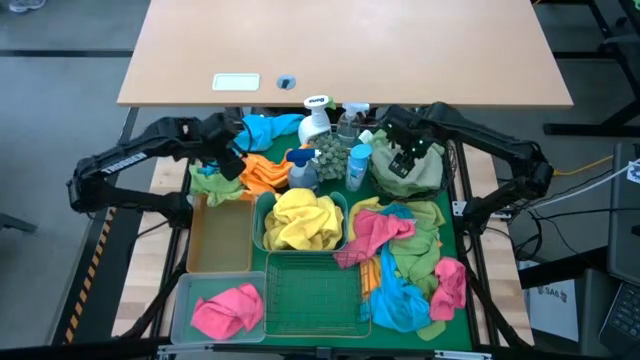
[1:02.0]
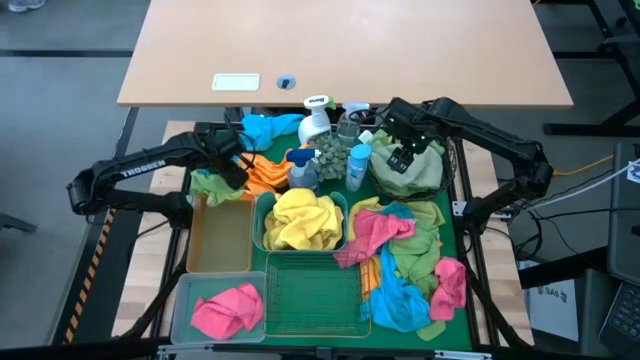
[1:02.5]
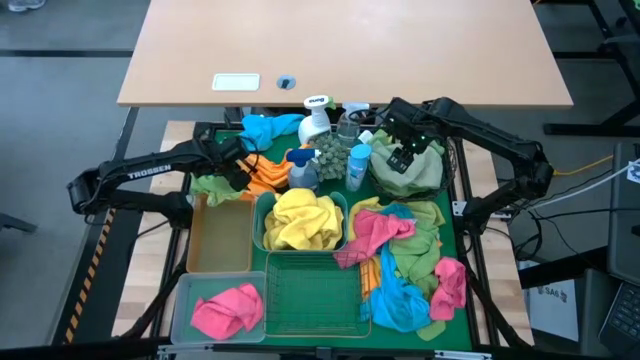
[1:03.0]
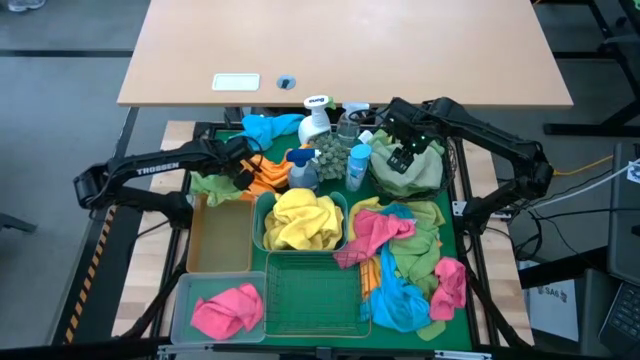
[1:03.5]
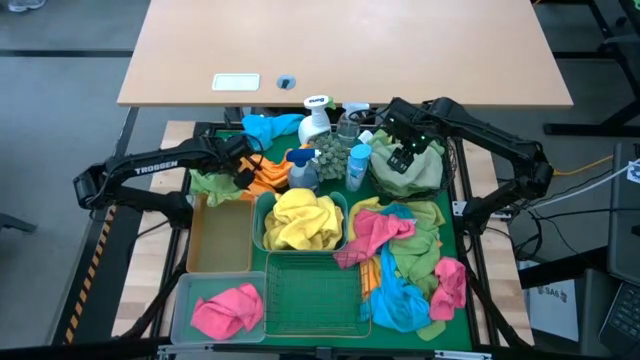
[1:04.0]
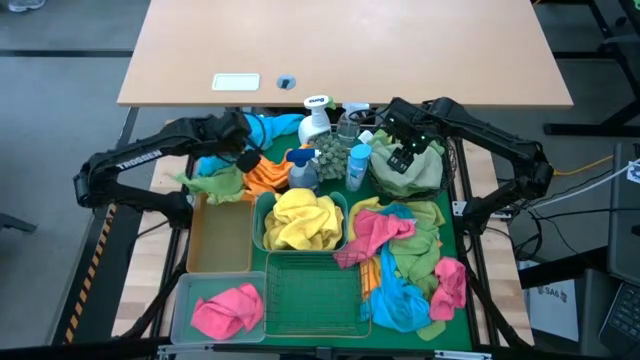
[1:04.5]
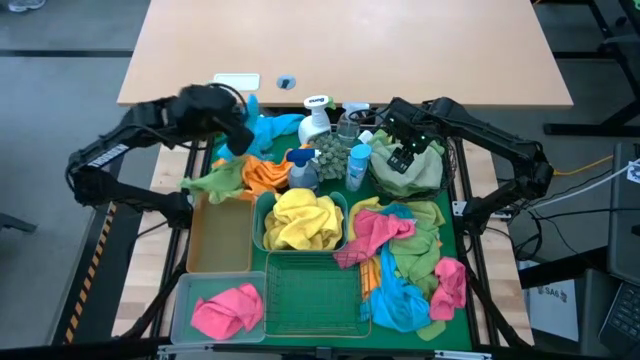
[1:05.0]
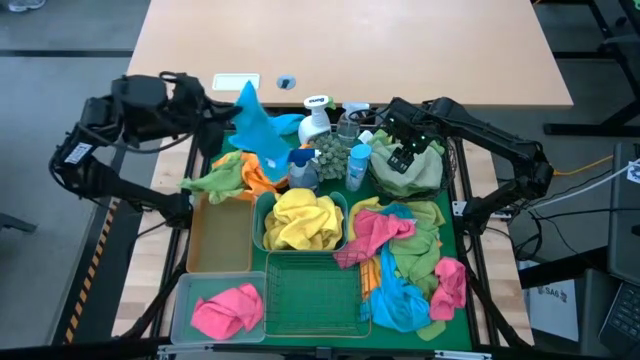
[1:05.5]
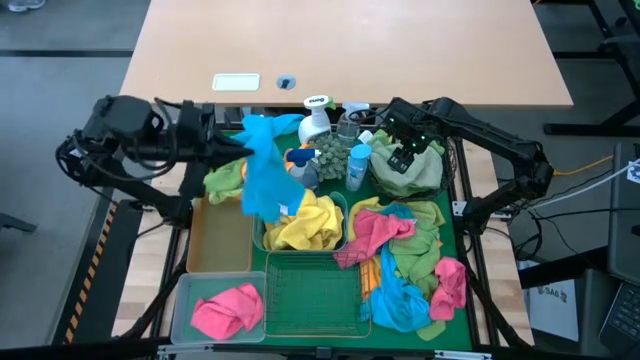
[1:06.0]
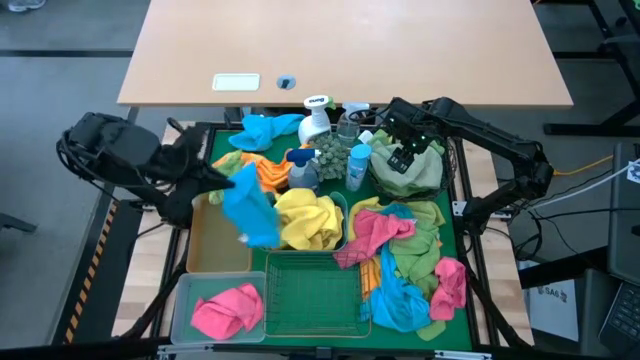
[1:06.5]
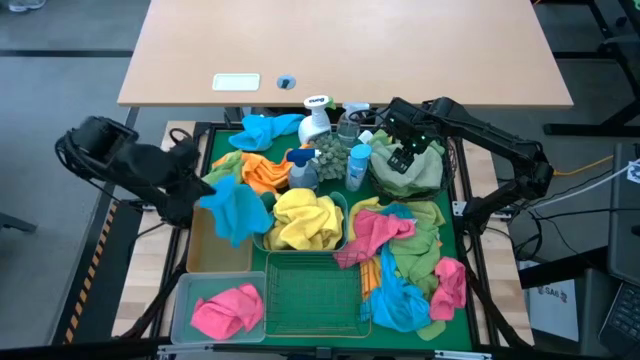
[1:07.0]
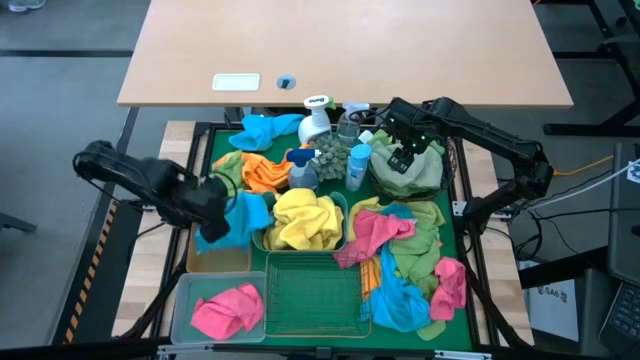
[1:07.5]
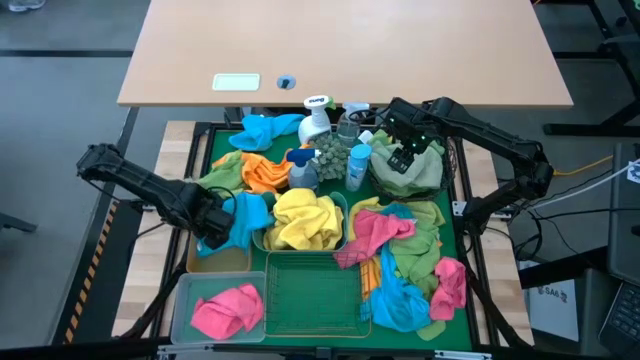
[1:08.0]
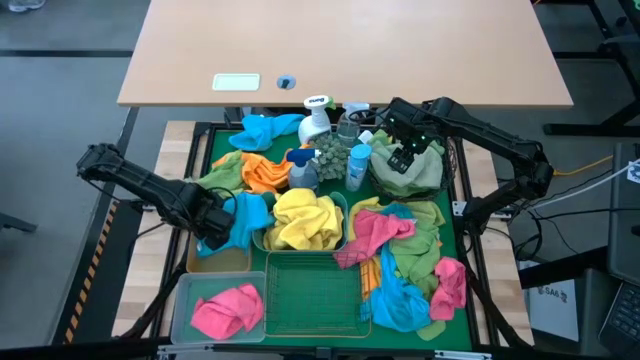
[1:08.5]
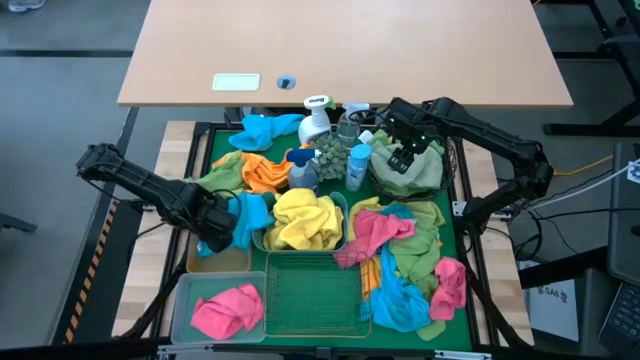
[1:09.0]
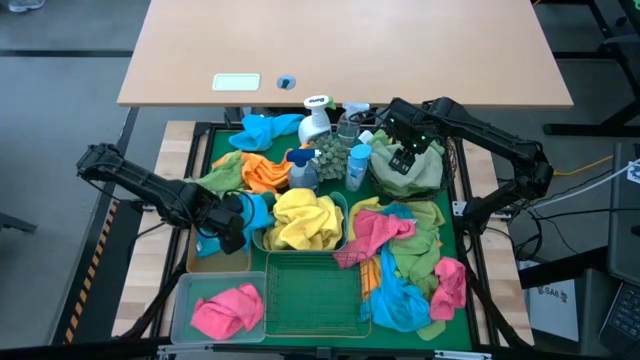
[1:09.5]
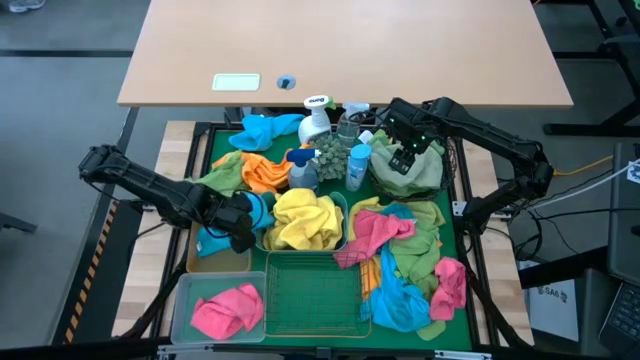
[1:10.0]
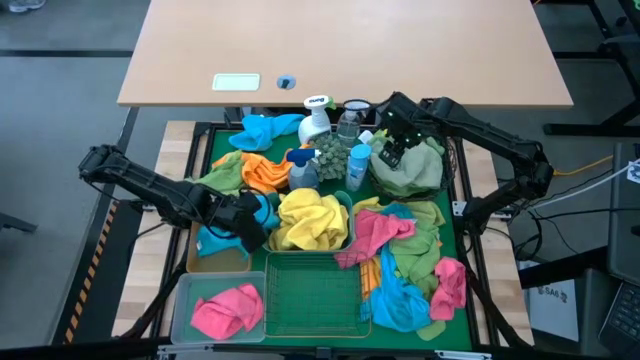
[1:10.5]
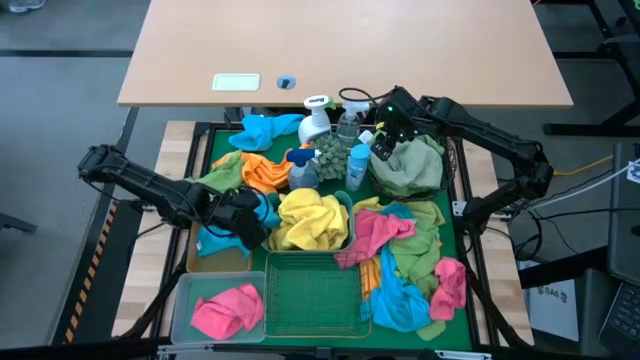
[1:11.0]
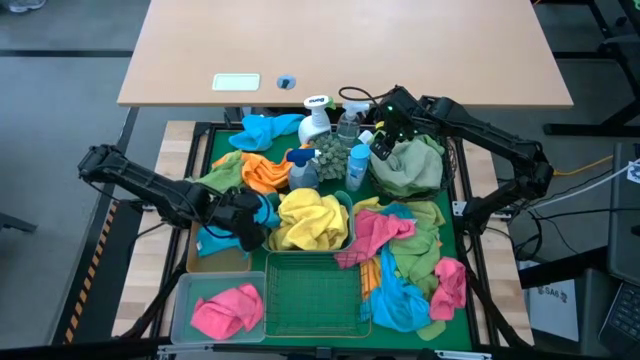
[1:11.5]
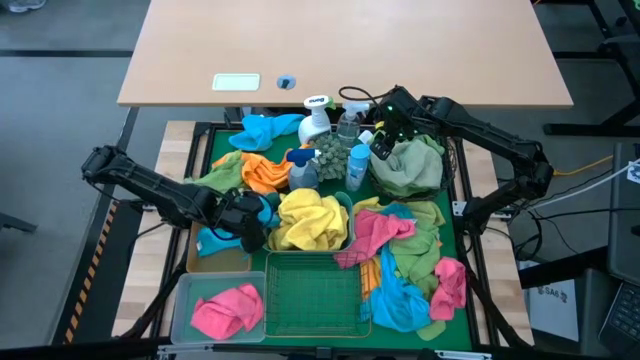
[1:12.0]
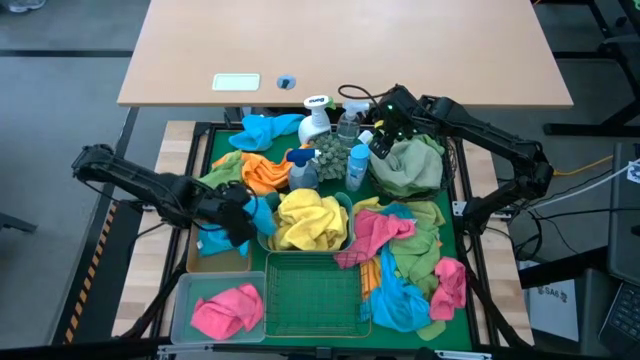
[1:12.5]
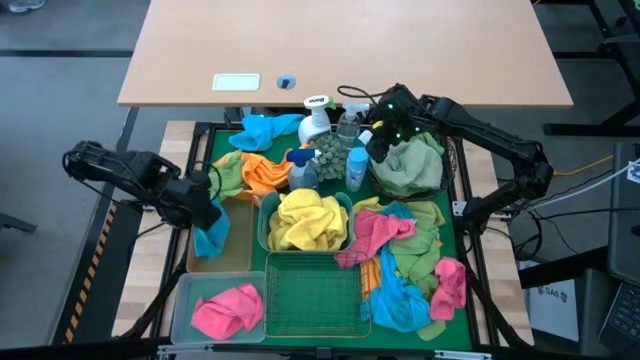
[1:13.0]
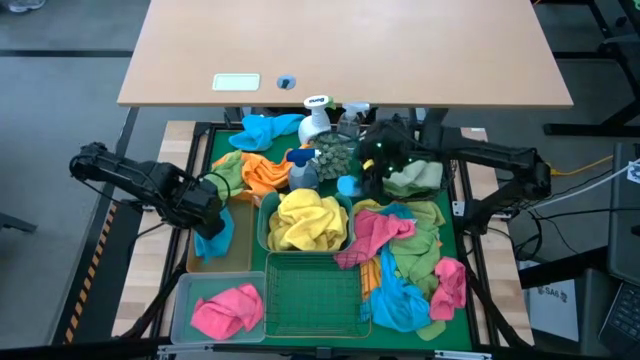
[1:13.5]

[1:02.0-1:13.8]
Task: Sort microfiber towel by color & place in baskets
Put the blue microfiber towel into the orange bin

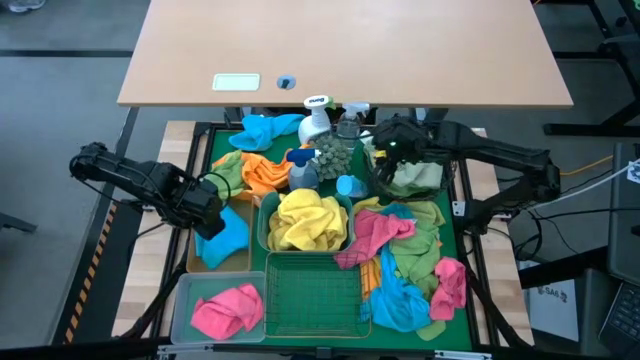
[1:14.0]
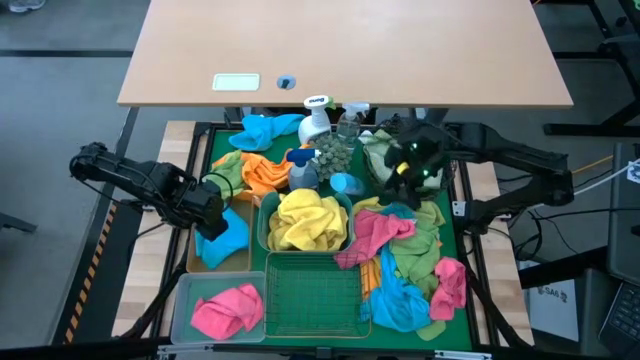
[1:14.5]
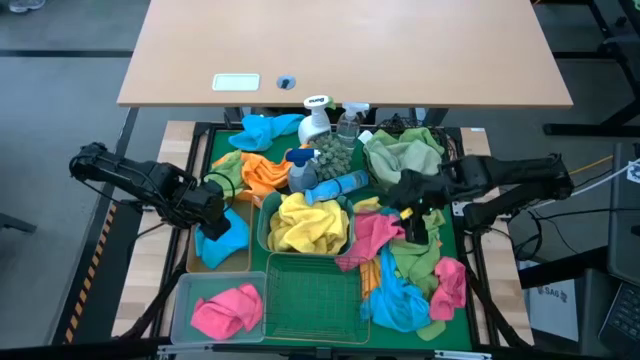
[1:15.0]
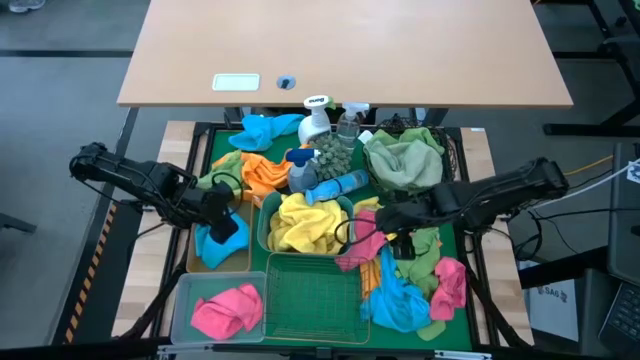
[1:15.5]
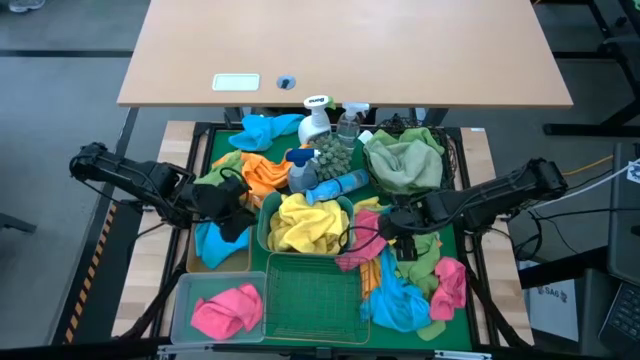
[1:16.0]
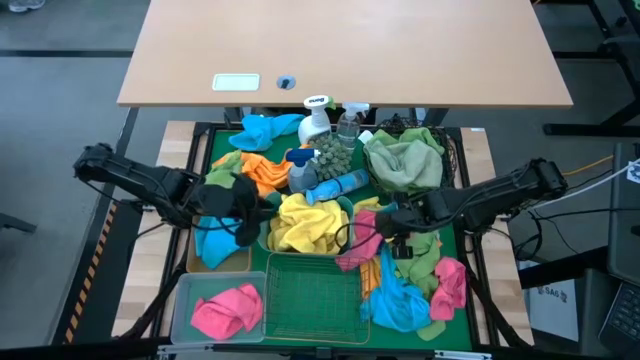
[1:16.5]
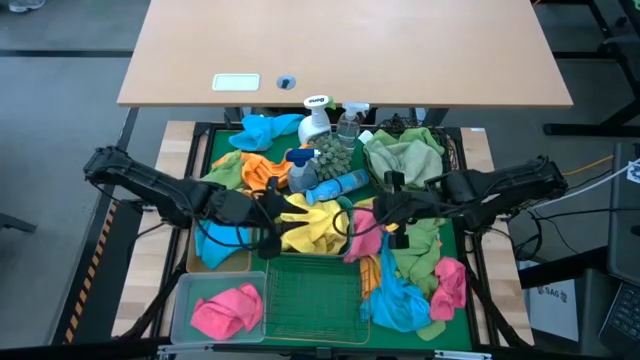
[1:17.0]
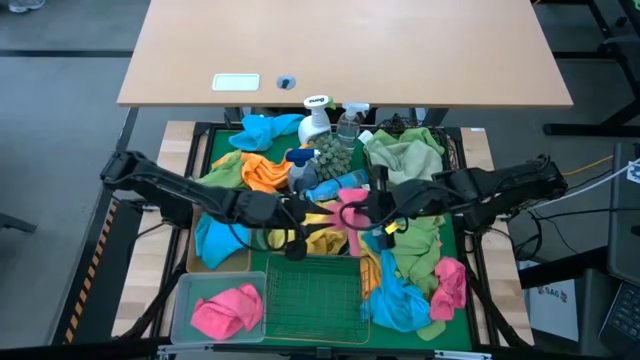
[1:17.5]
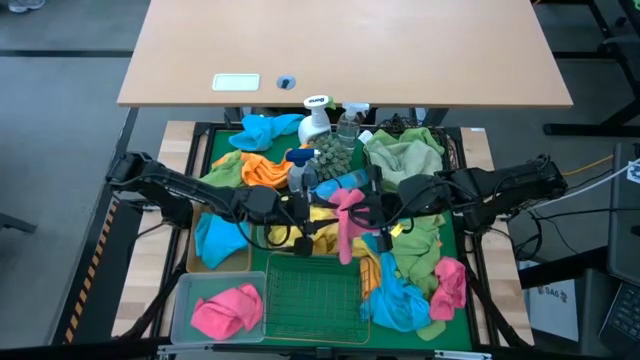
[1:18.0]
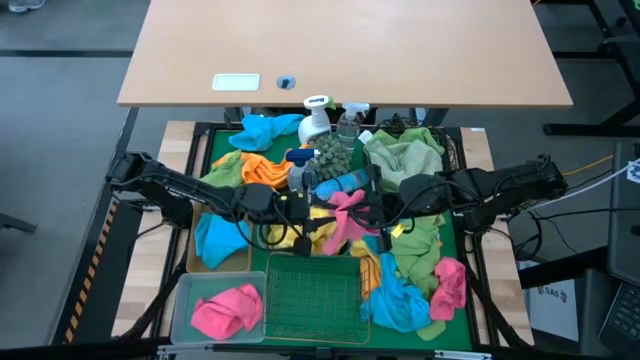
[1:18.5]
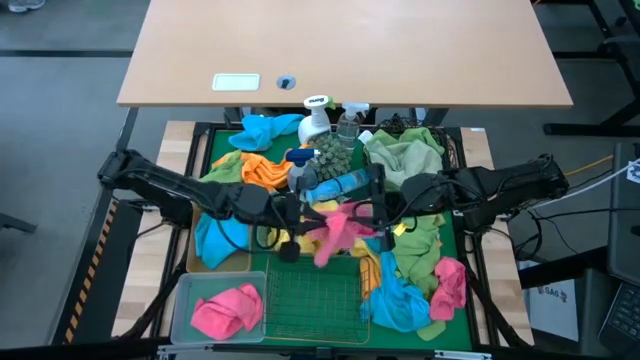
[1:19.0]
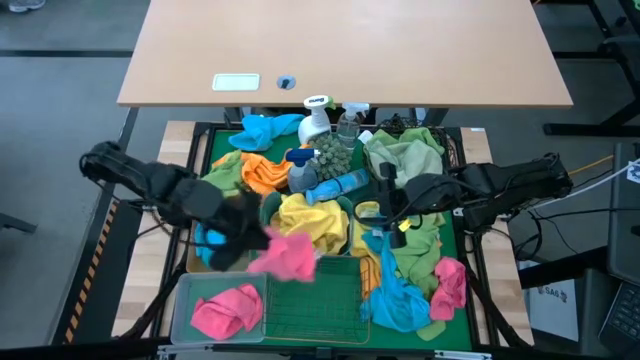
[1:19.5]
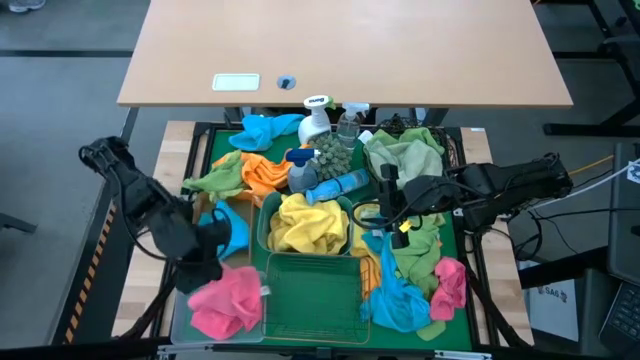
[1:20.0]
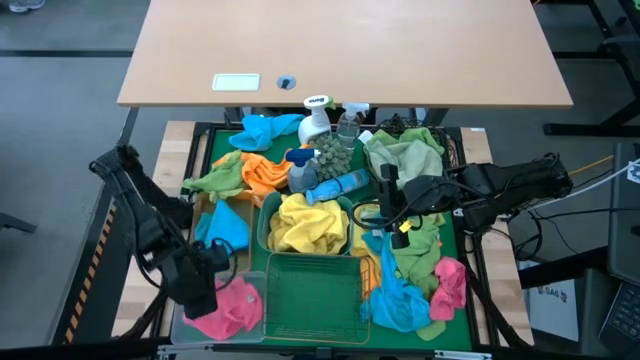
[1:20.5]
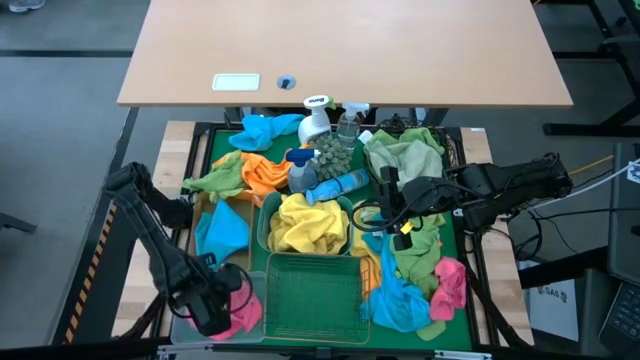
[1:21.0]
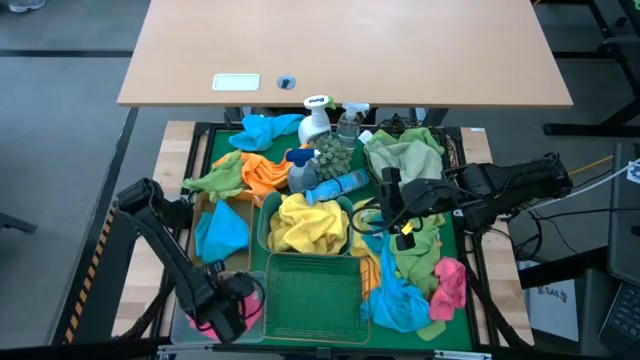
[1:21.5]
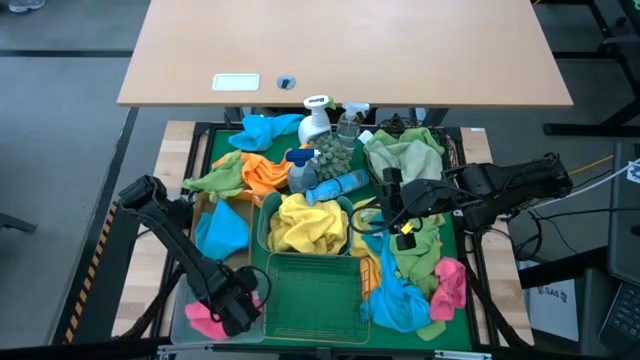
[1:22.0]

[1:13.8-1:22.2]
Put the pink microfiber towel into the transparent bin

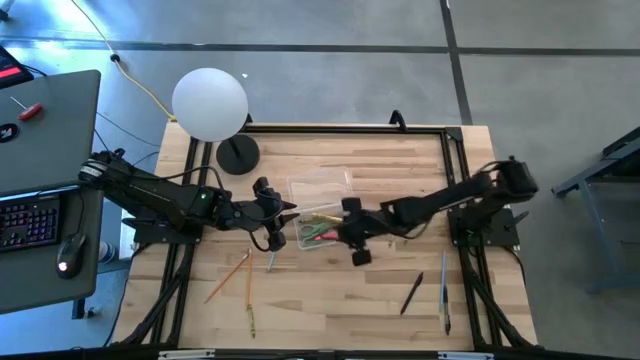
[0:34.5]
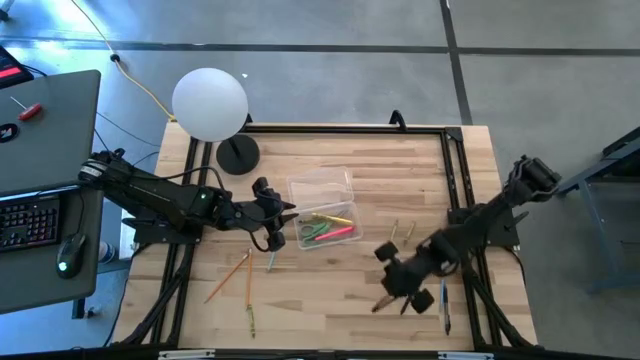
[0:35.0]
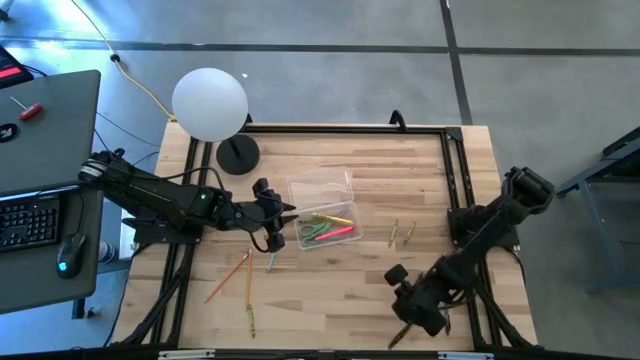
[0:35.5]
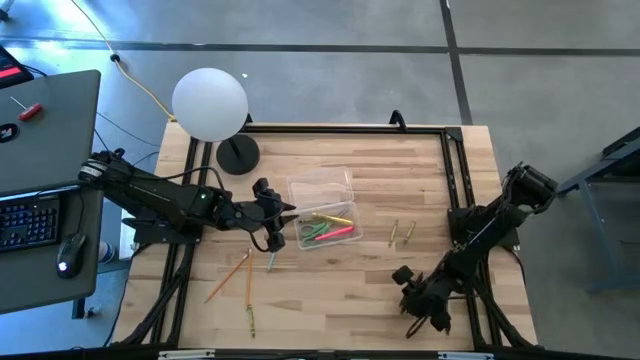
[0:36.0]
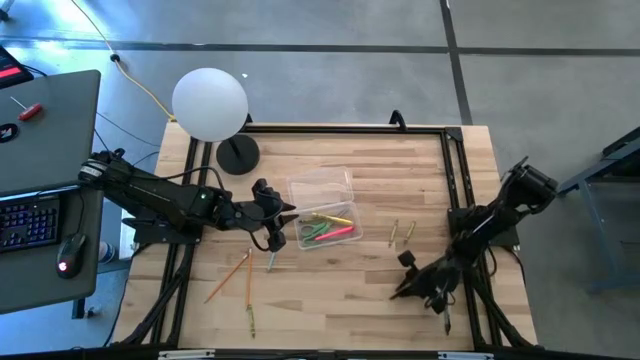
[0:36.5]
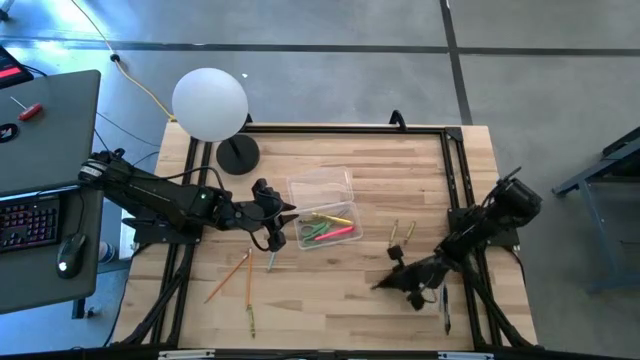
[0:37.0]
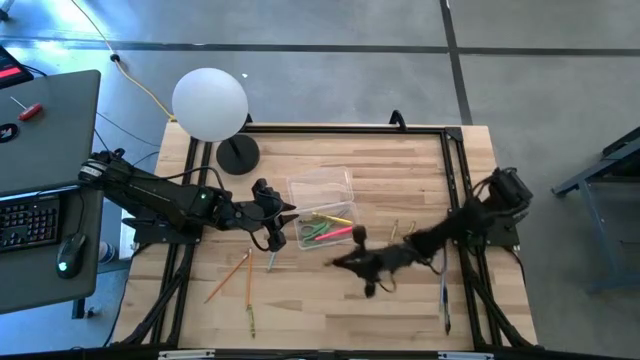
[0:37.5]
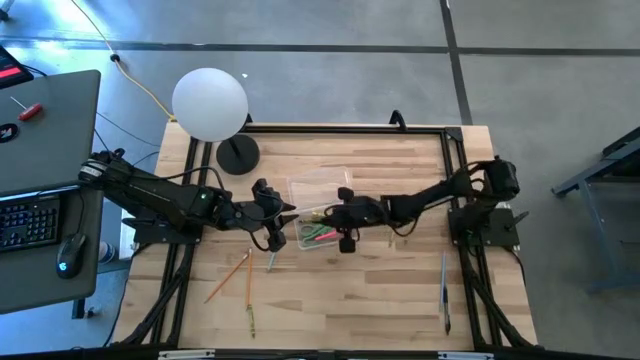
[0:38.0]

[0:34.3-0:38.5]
Task: Pick & place school supplies into a supply box
Put the black pen into the transparent supply box
